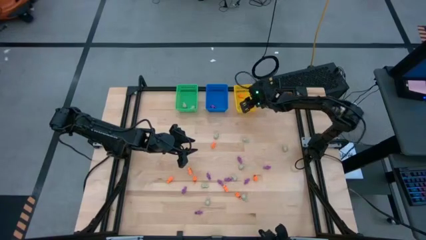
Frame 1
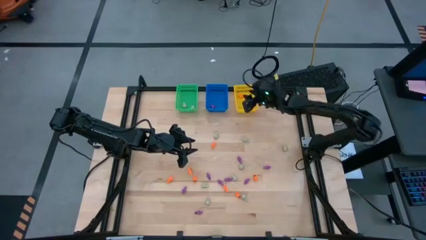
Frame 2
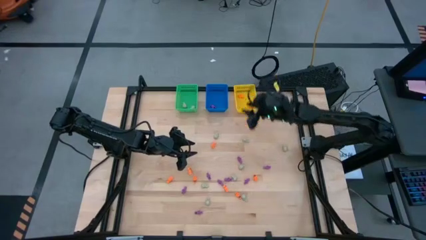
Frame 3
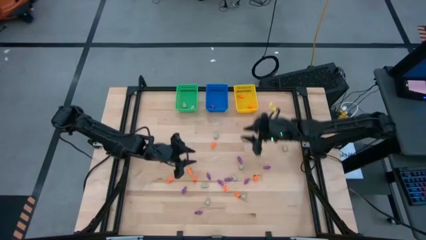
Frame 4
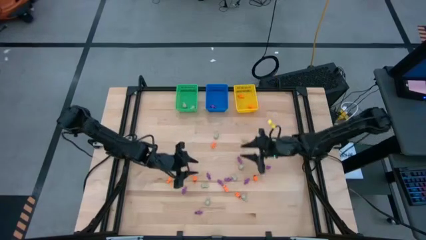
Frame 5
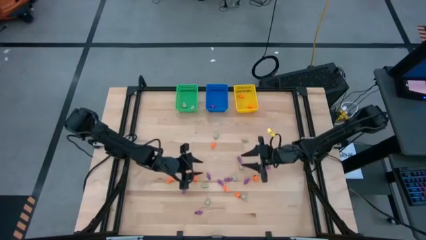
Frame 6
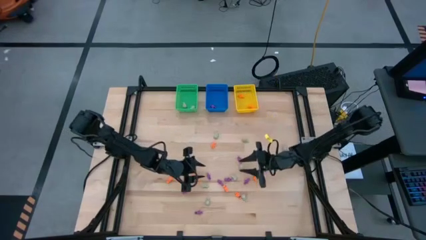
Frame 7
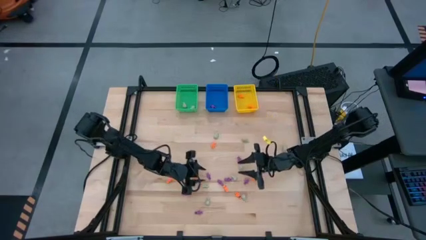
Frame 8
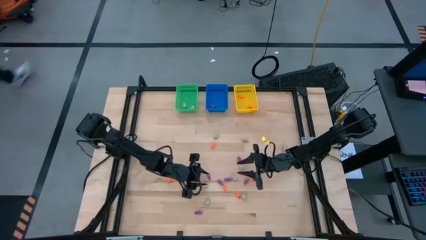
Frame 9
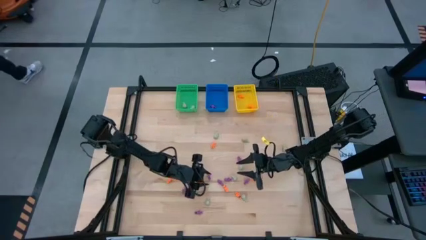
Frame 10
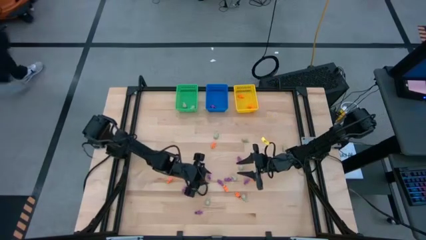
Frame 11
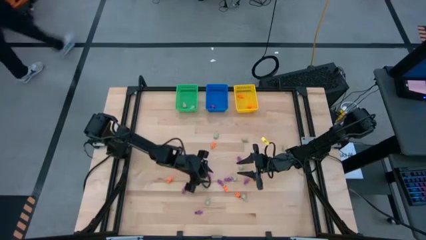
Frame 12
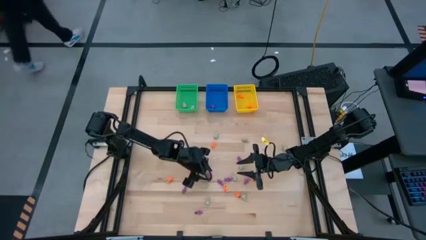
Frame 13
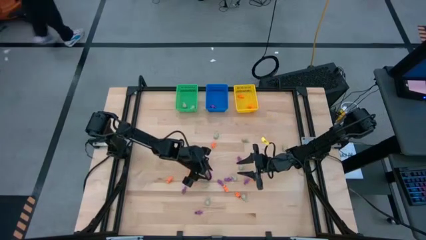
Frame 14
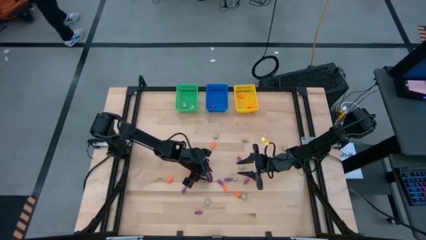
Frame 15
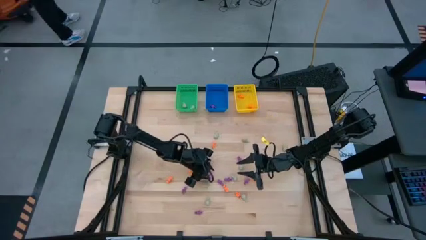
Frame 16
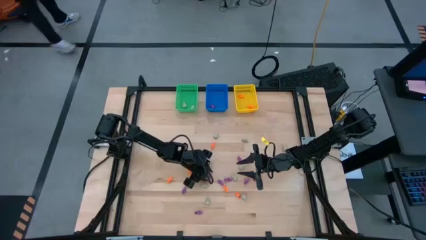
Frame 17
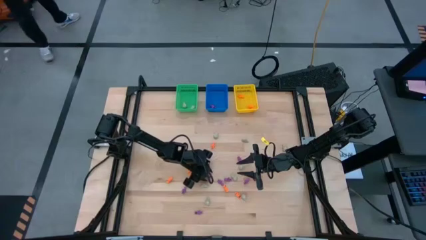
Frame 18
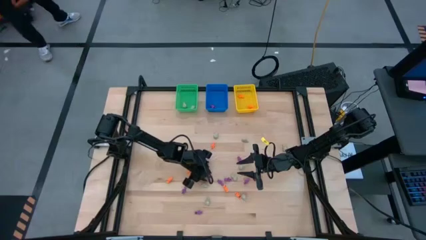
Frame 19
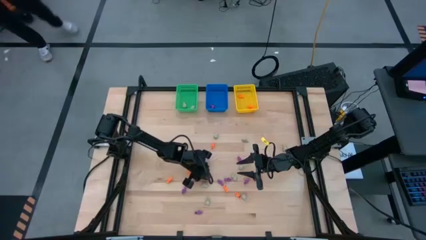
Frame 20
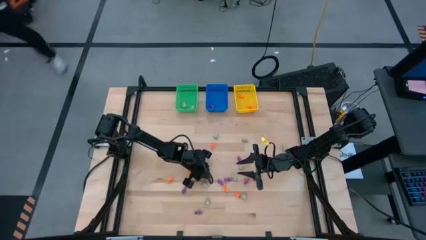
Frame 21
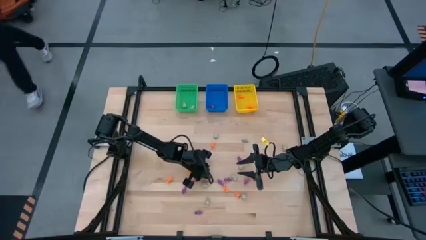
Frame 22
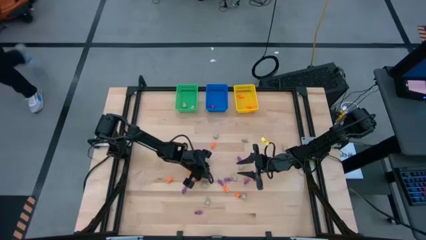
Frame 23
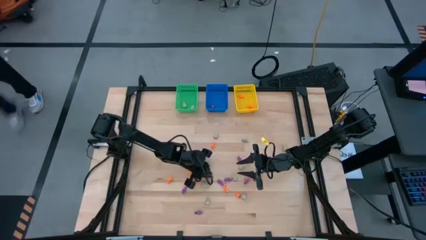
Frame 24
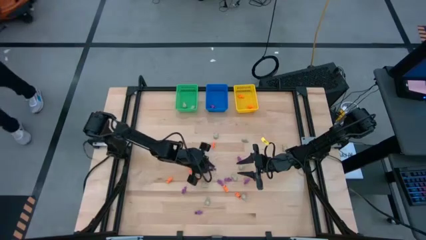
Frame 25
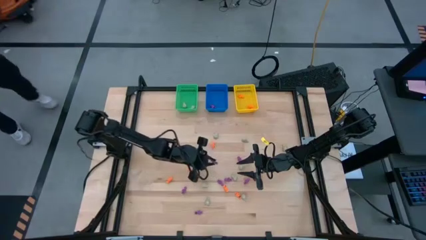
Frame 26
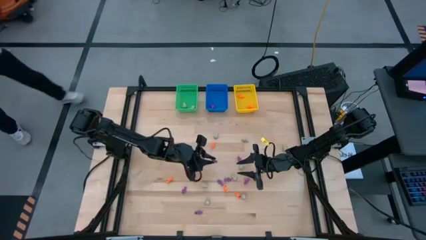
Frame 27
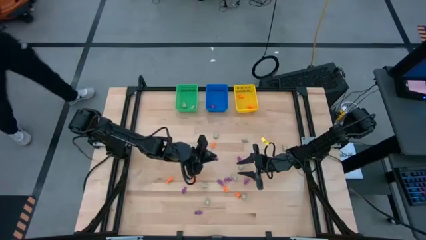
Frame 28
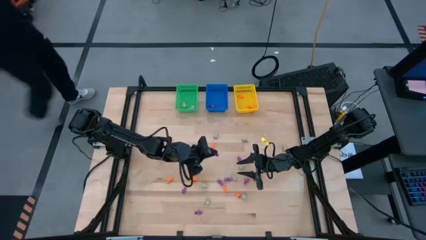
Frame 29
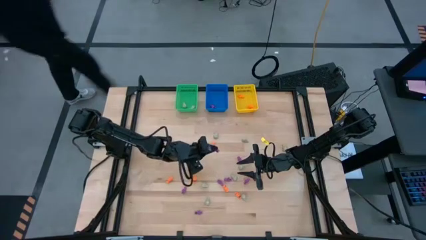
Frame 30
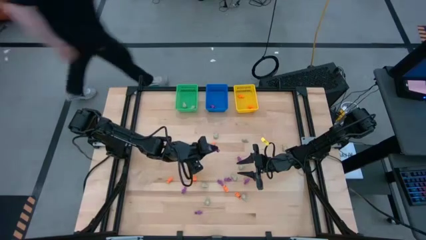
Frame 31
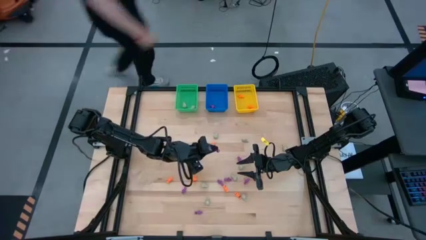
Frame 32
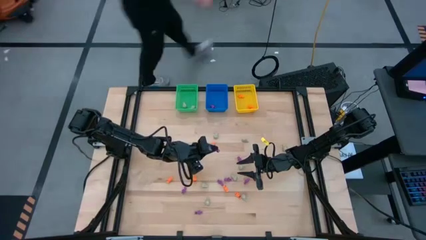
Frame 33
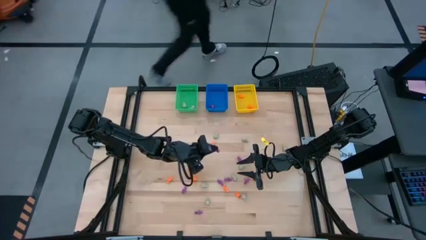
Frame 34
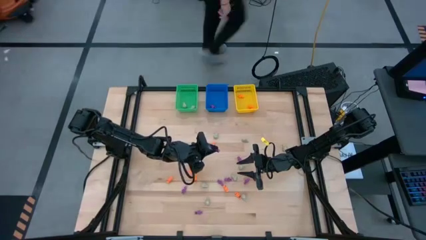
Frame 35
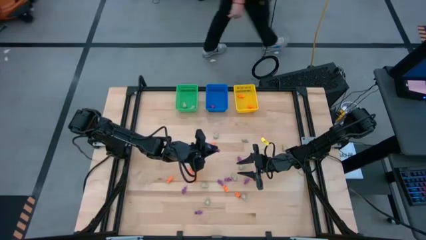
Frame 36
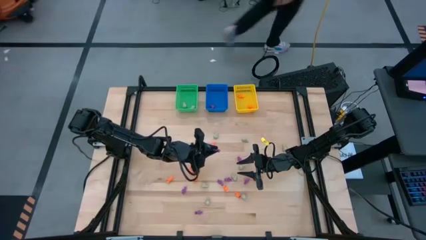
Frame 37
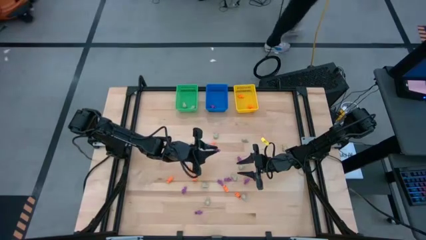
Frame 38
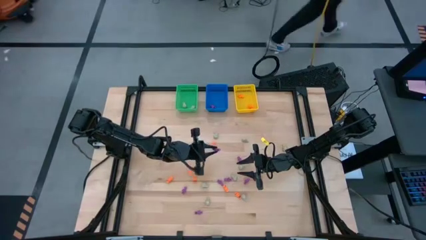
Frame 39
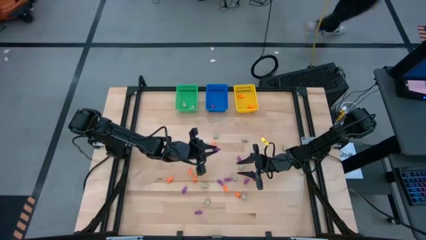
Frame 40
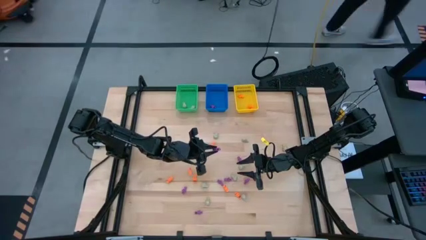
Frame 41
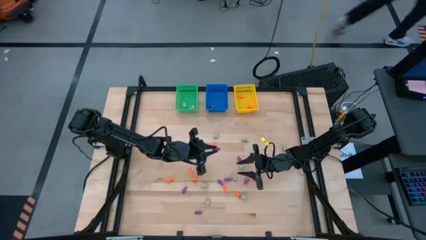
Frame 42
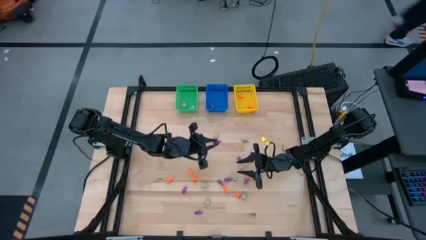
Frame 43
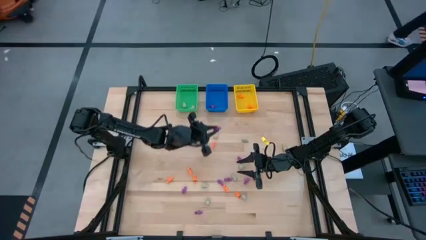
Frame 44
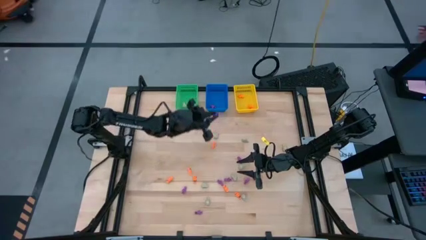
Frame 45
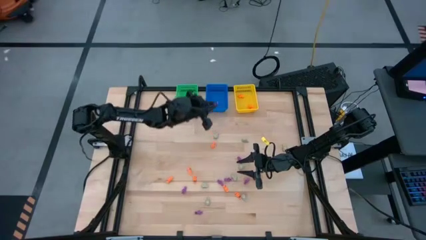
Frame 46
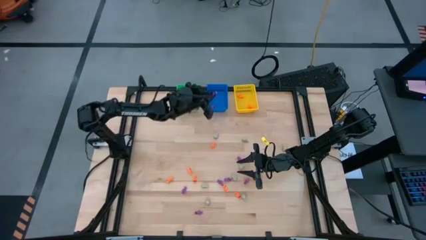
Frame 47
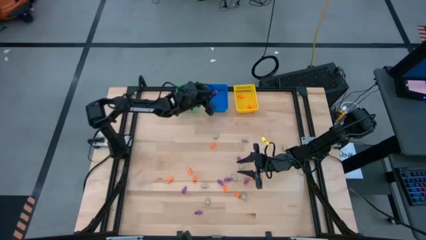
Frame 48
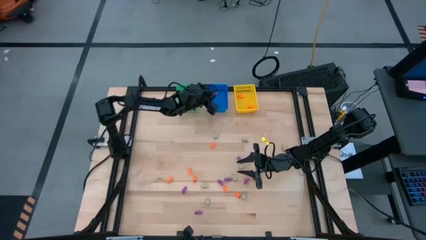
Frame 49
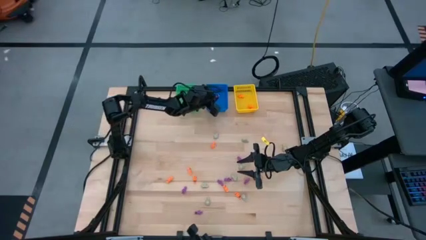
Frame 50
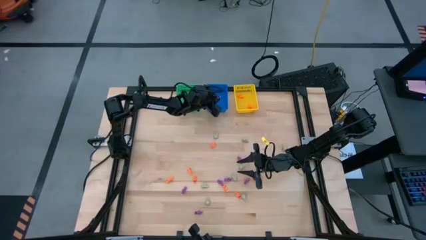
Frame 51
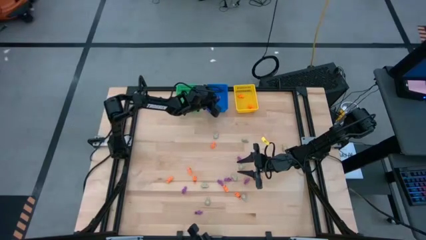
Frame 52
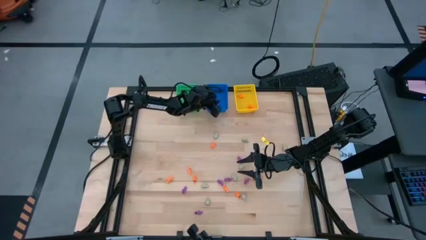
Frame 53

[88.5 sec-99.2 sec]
Task: Sort Halloween decoration
Put the purple skeleton toy into the blue bin

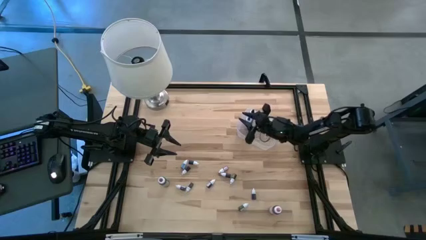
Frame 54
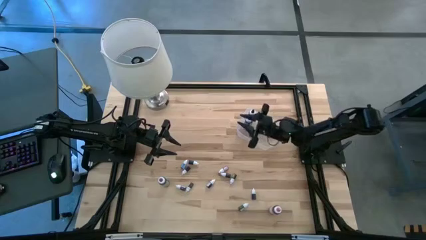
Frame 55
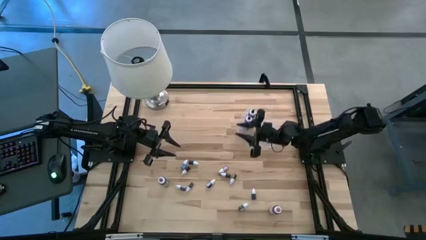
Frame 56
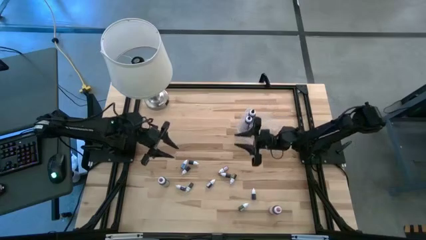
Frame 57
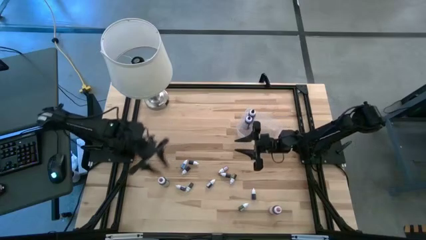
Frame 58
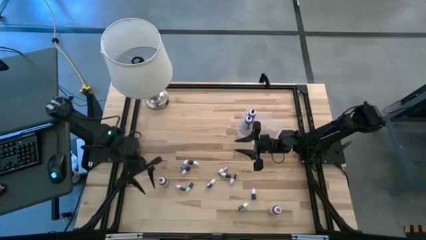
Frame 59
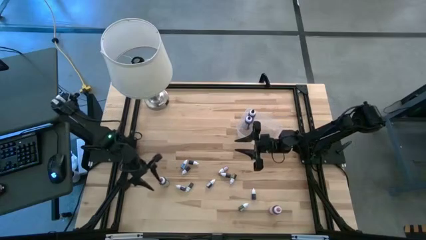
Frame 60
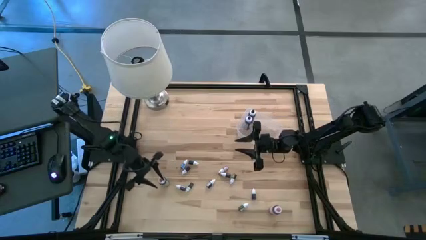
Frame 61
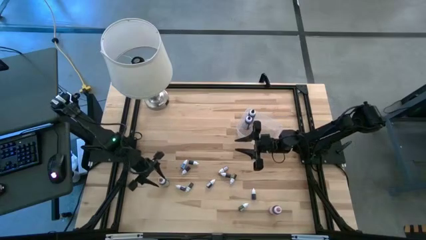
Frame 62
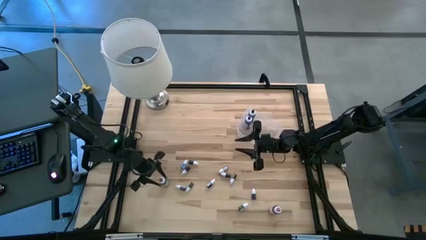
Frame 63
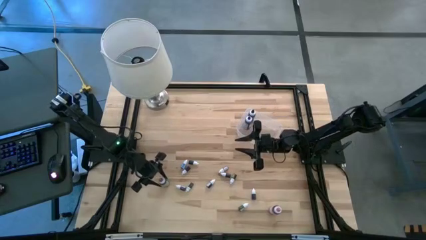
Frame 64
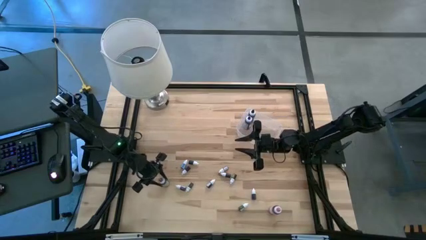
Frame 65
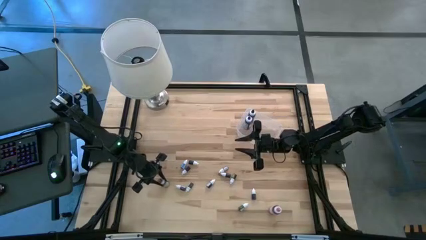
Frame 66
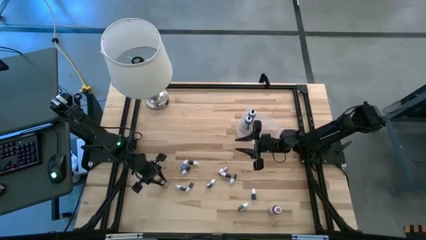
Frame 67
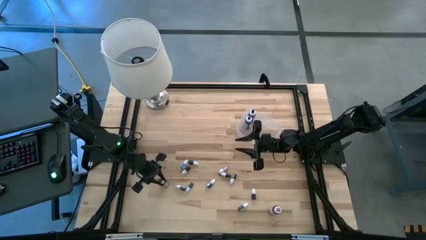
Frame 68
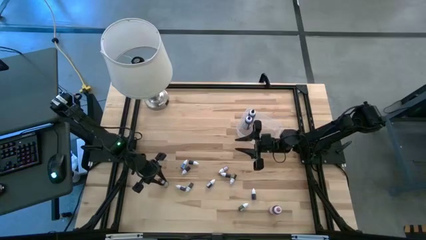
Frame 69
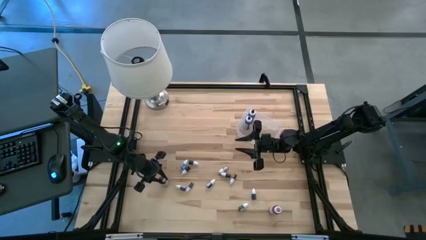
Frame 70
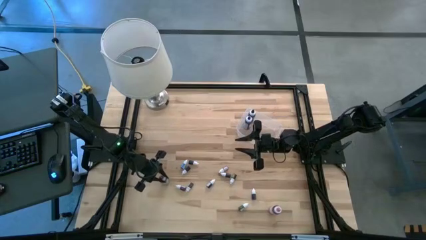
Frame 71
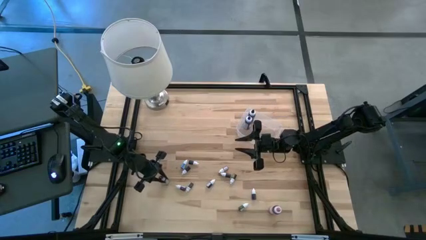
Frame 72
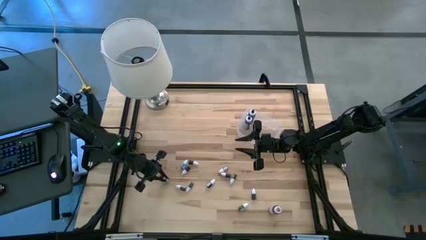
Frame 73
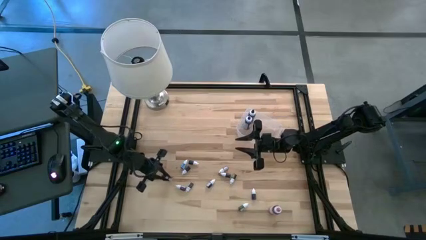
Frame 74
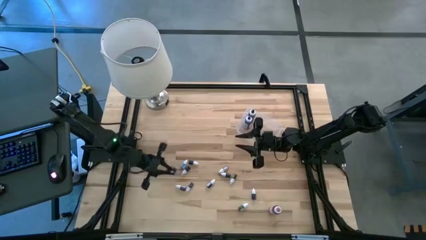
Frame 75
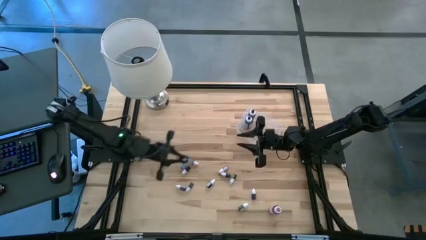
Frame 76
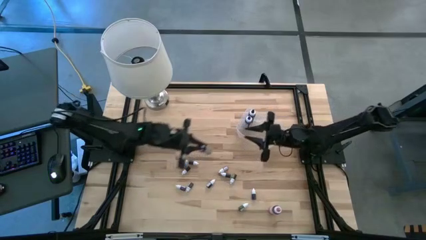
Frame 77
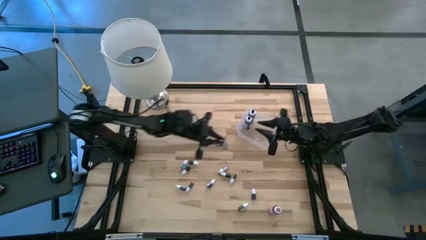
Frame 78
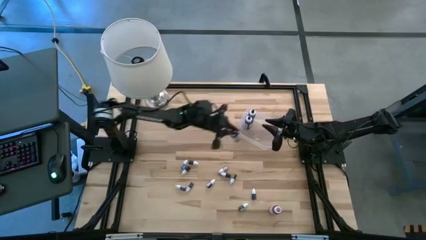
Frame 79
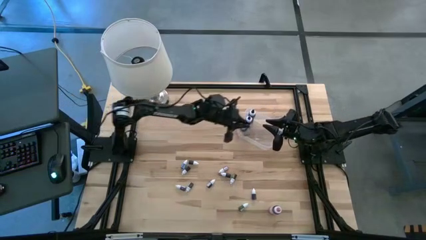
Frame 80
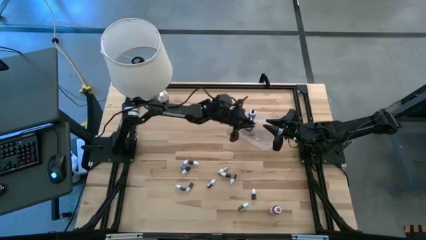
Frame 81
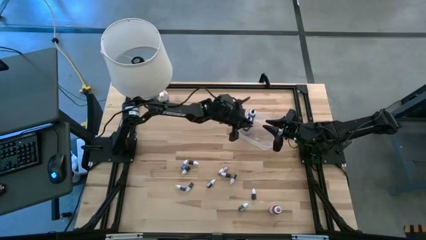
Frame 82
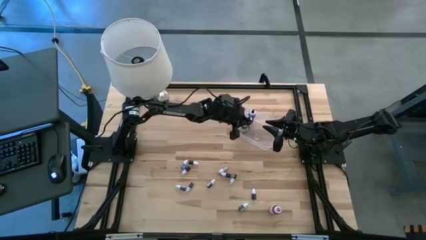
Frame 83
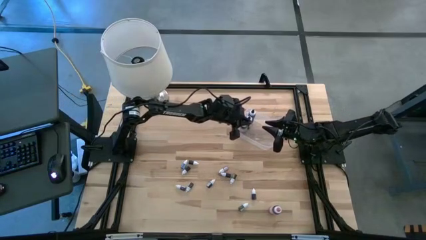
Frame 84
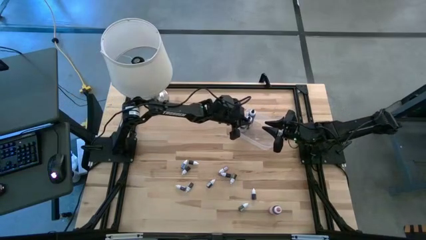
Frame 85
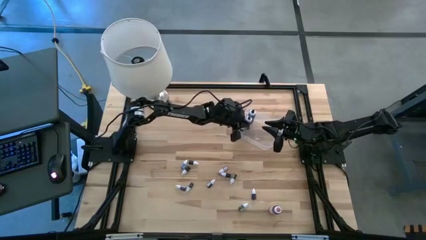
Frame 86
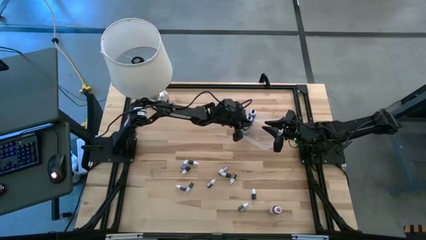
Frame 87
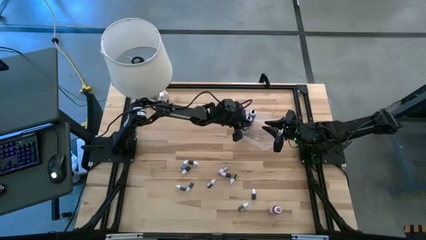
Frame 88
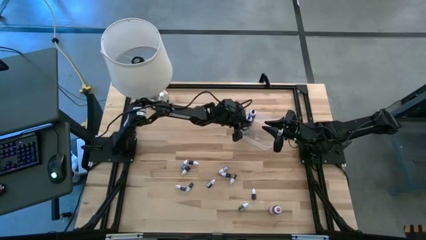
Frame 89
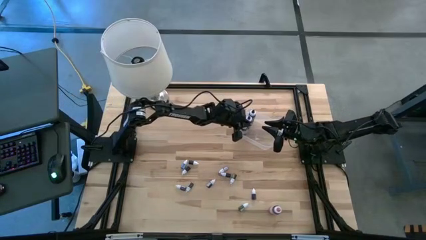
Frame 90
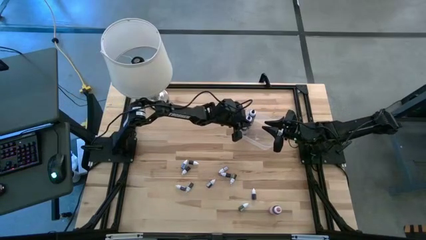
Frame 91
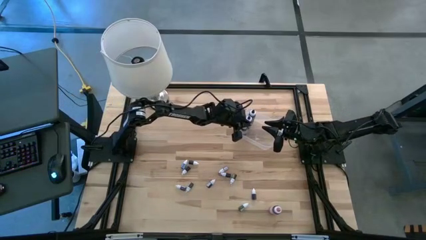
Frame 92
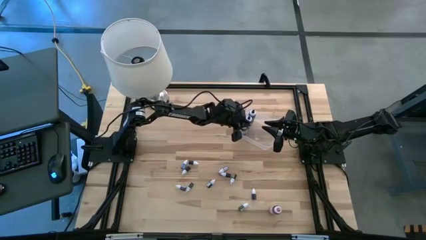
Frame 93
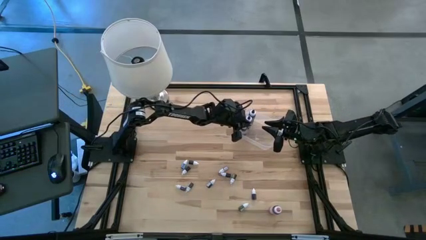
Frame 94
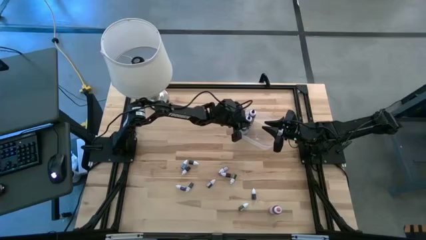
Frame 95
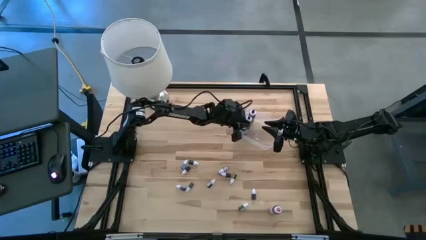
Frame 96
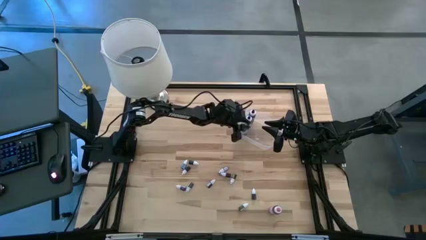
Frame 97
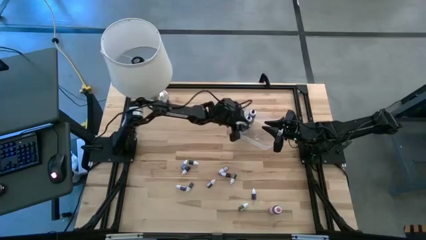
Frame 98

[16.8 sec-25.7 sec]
Task: Pick & Place food coloring
Put the large violet food coloring bottle into the transparent bin
